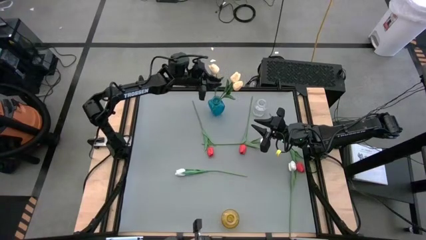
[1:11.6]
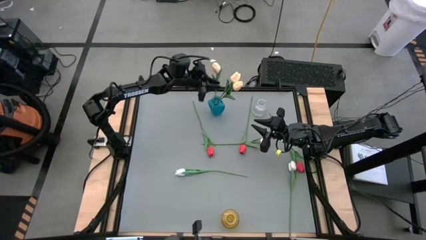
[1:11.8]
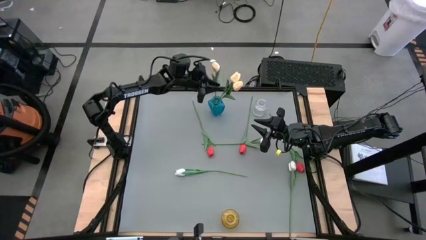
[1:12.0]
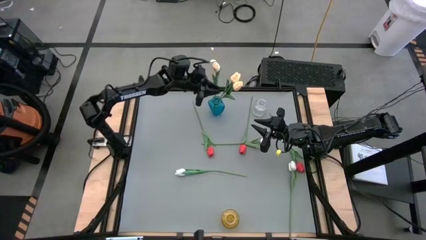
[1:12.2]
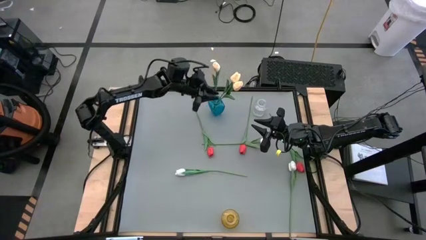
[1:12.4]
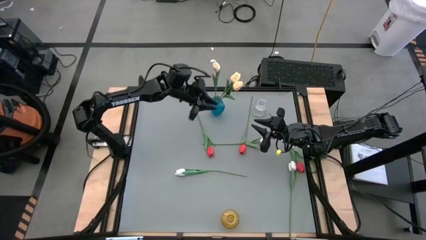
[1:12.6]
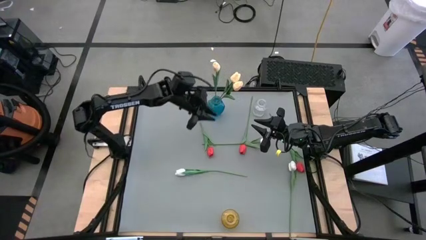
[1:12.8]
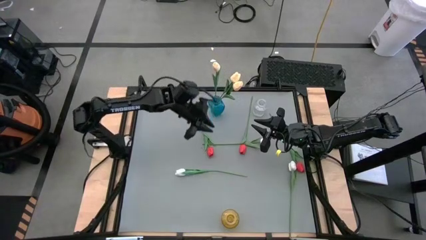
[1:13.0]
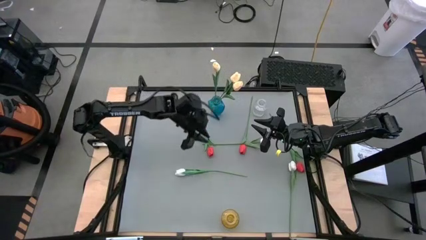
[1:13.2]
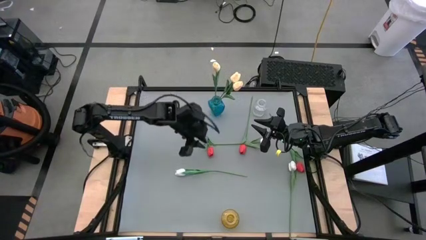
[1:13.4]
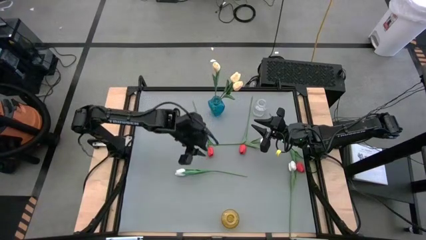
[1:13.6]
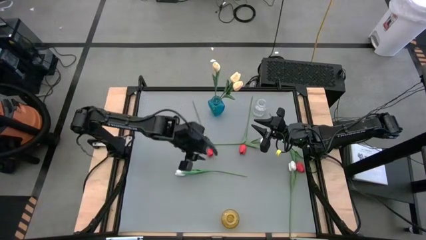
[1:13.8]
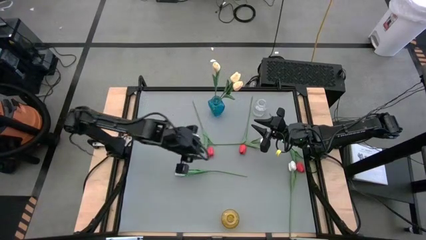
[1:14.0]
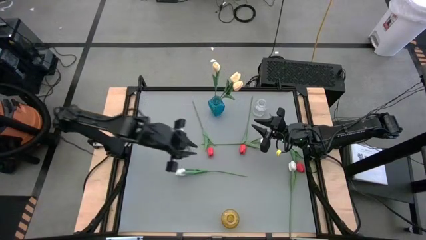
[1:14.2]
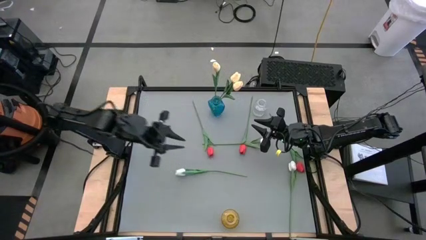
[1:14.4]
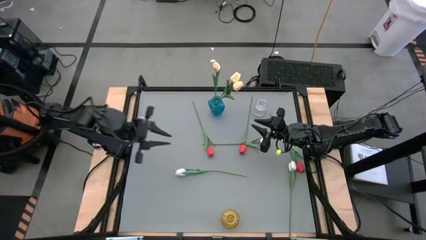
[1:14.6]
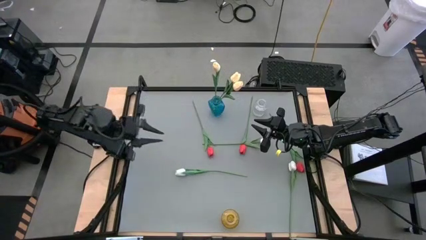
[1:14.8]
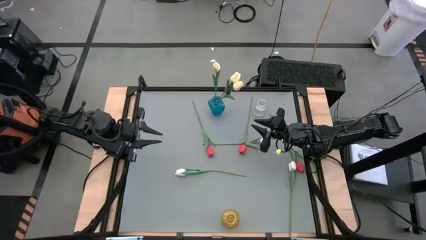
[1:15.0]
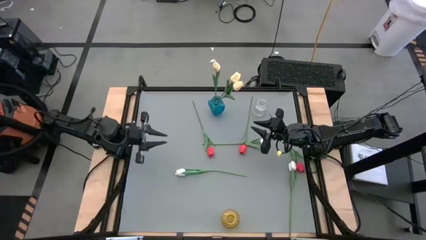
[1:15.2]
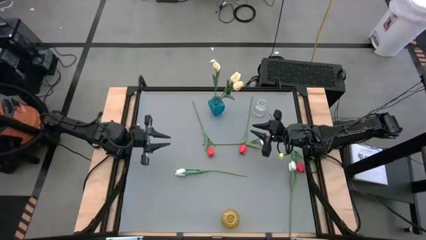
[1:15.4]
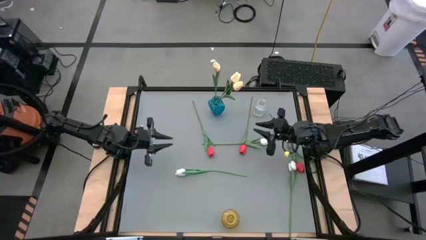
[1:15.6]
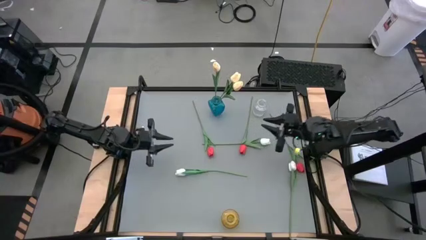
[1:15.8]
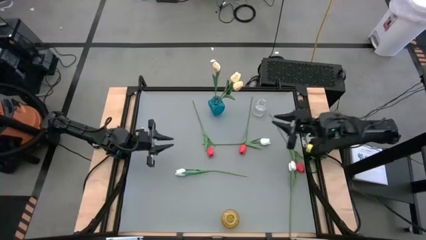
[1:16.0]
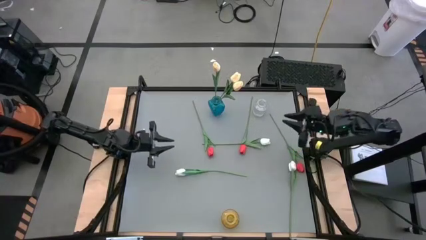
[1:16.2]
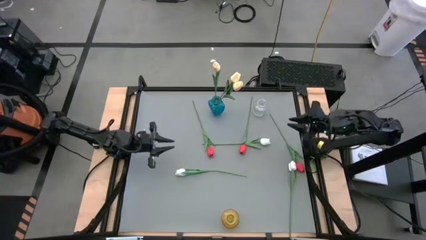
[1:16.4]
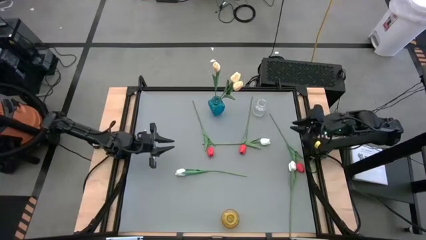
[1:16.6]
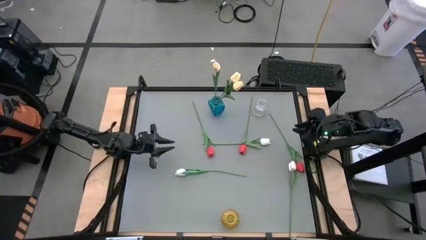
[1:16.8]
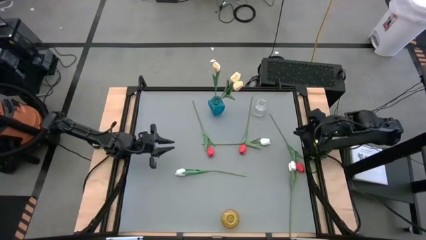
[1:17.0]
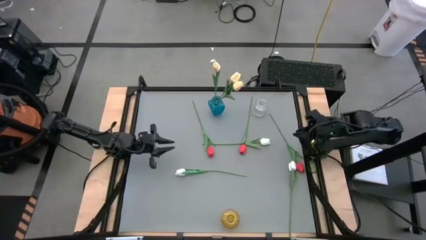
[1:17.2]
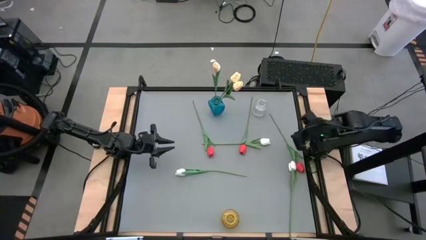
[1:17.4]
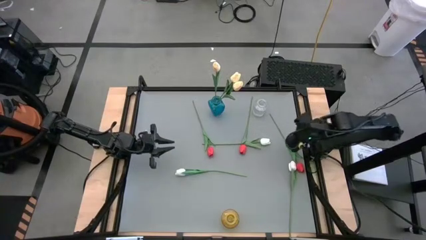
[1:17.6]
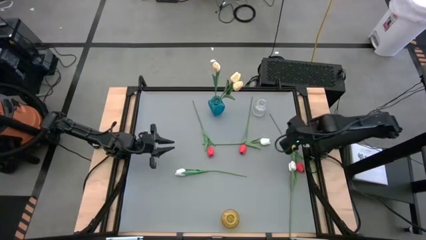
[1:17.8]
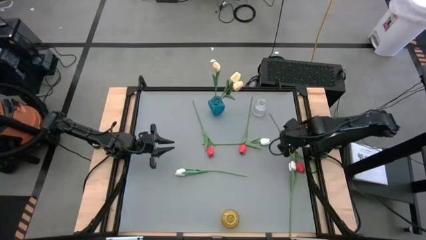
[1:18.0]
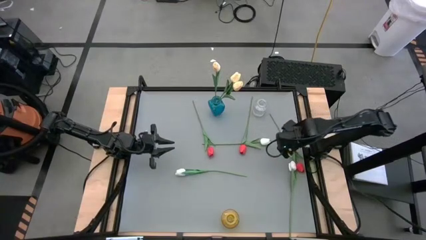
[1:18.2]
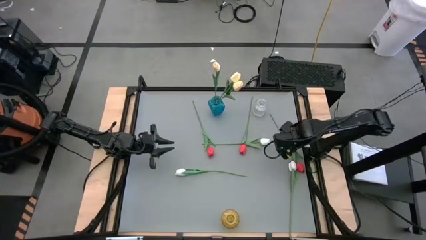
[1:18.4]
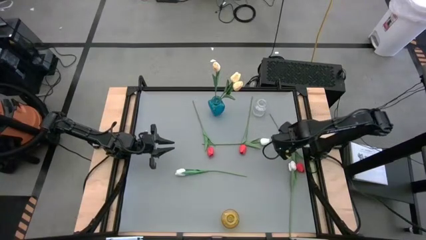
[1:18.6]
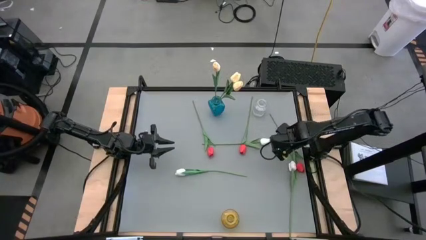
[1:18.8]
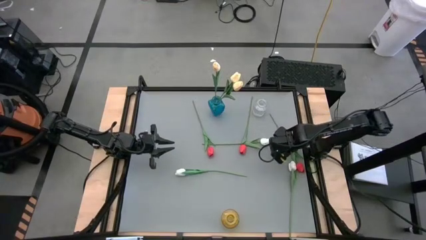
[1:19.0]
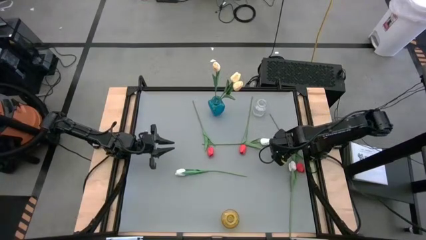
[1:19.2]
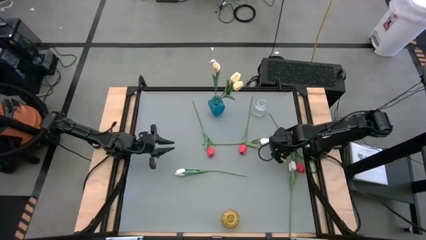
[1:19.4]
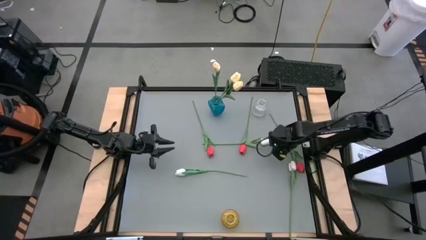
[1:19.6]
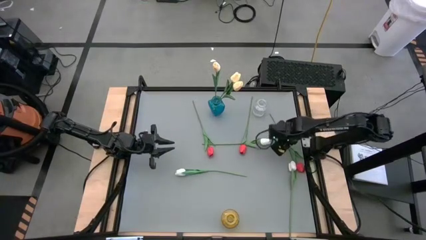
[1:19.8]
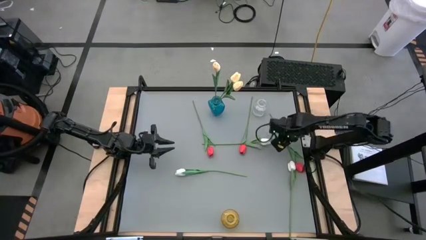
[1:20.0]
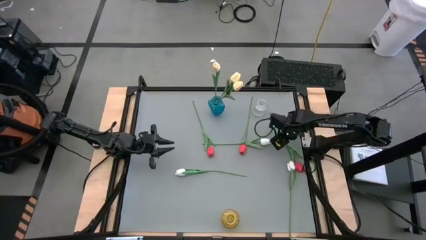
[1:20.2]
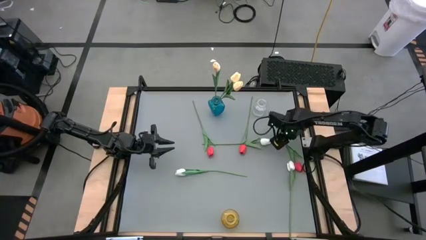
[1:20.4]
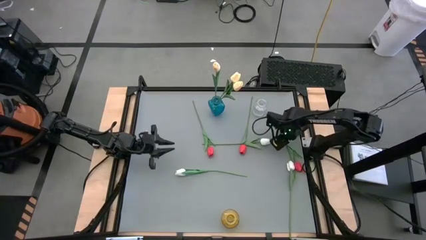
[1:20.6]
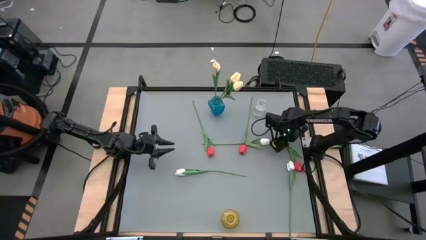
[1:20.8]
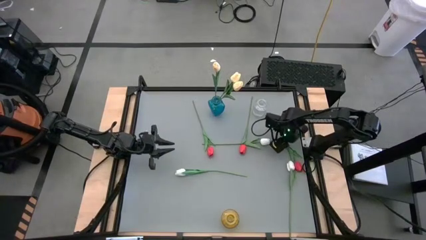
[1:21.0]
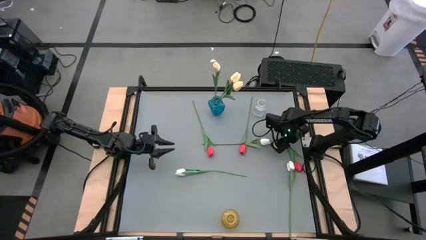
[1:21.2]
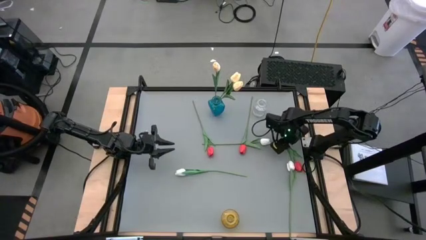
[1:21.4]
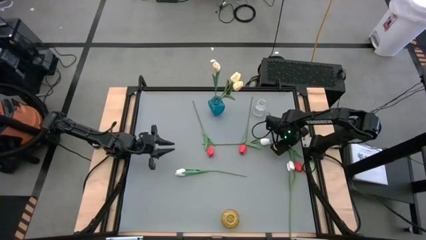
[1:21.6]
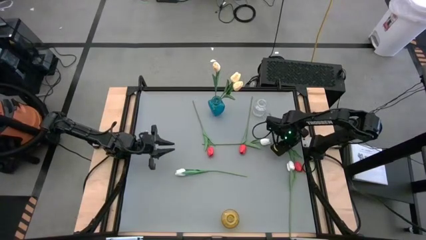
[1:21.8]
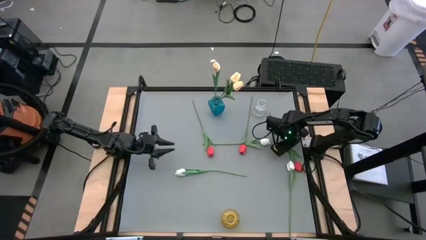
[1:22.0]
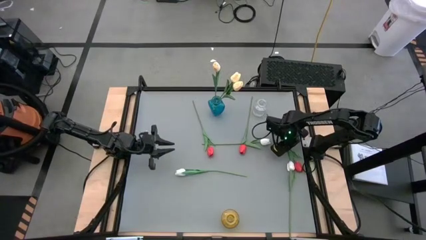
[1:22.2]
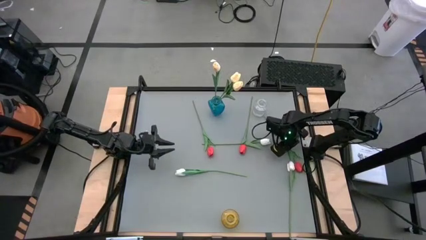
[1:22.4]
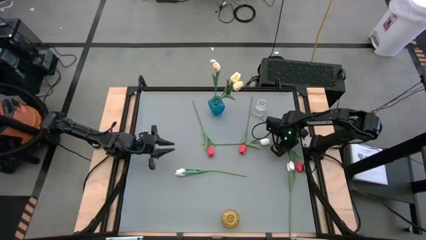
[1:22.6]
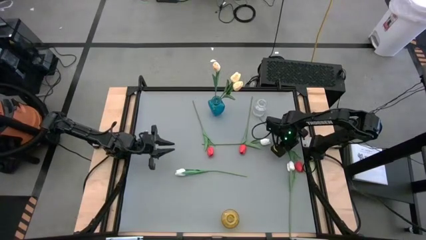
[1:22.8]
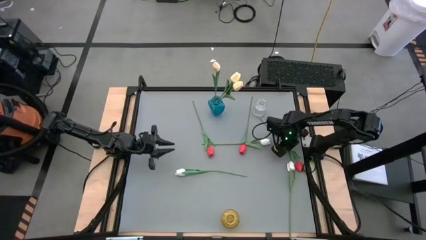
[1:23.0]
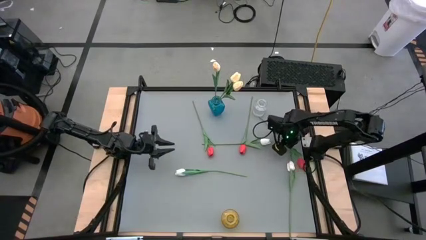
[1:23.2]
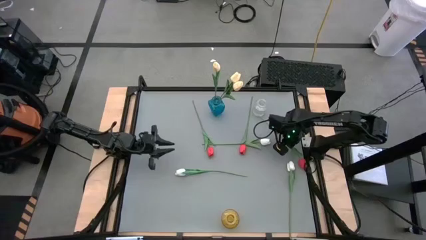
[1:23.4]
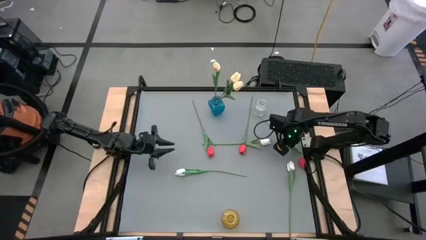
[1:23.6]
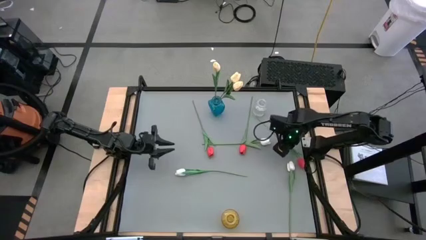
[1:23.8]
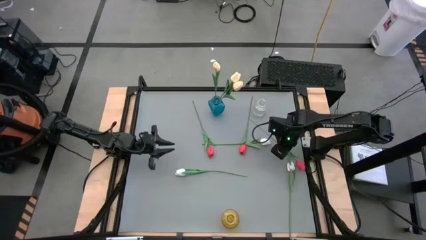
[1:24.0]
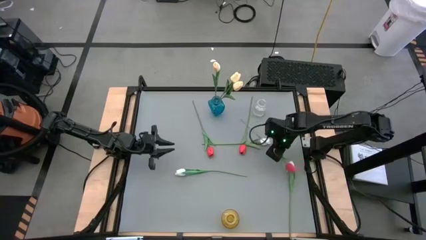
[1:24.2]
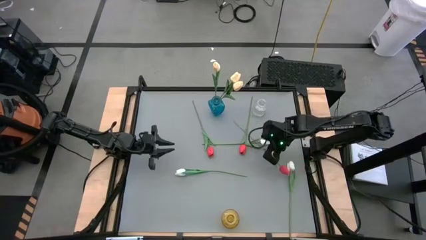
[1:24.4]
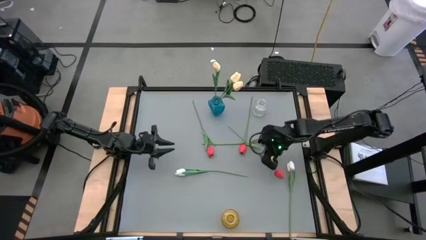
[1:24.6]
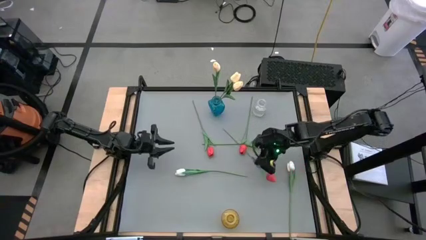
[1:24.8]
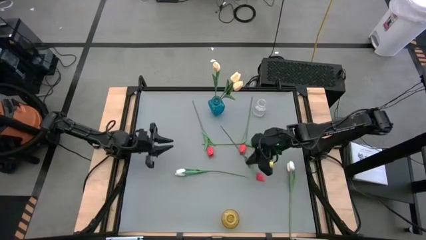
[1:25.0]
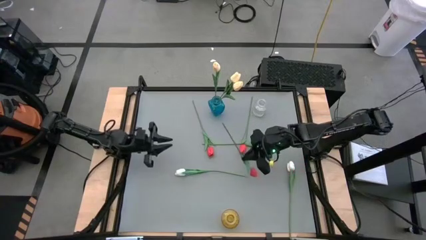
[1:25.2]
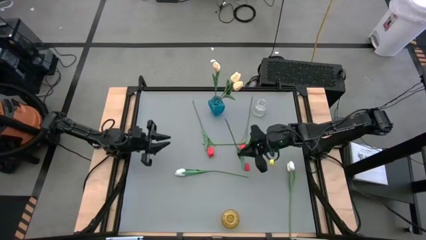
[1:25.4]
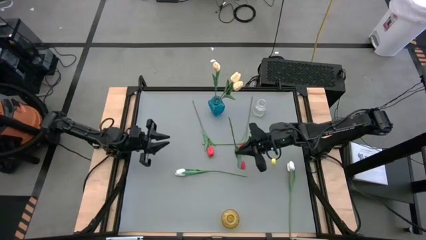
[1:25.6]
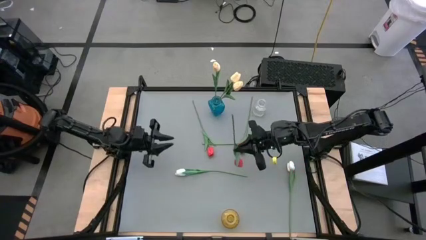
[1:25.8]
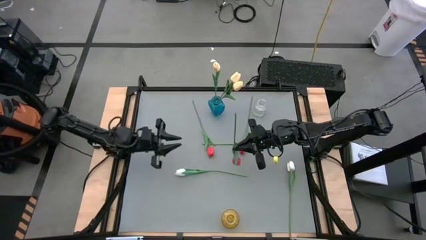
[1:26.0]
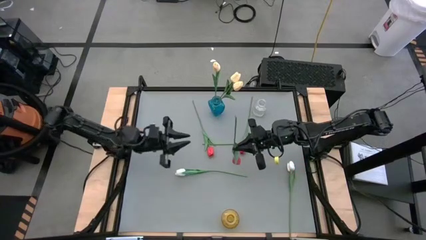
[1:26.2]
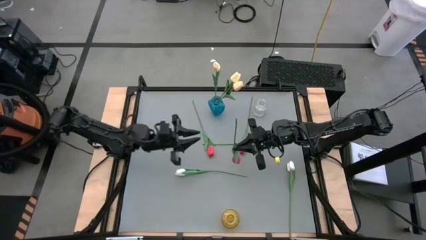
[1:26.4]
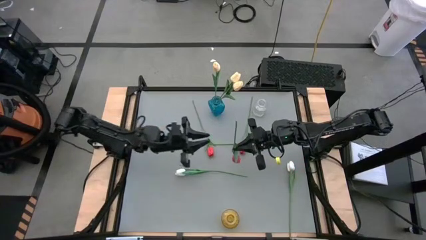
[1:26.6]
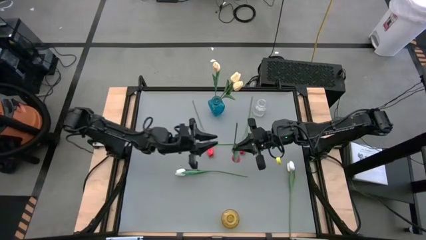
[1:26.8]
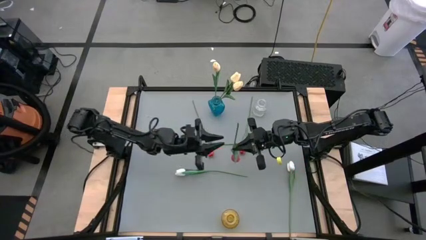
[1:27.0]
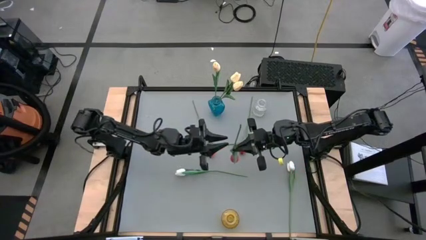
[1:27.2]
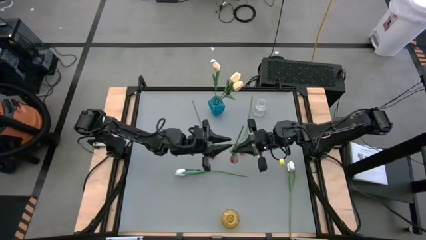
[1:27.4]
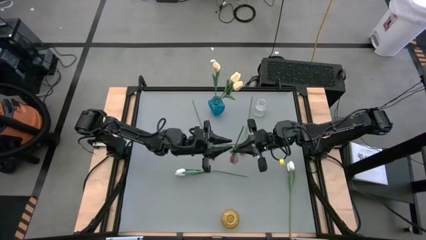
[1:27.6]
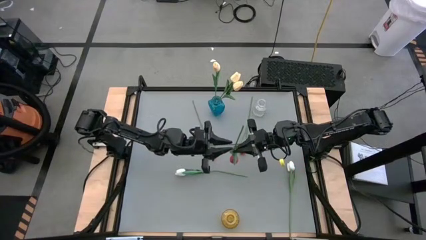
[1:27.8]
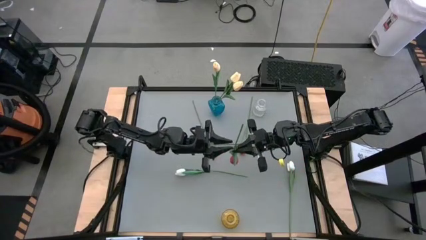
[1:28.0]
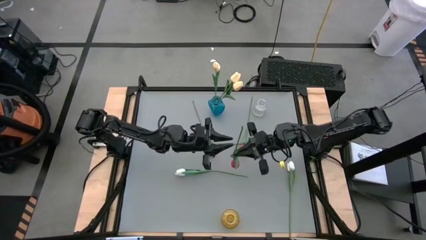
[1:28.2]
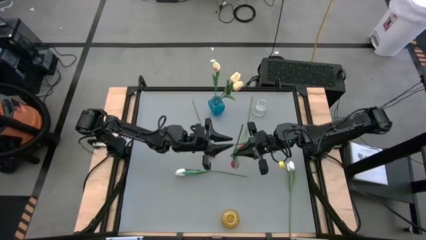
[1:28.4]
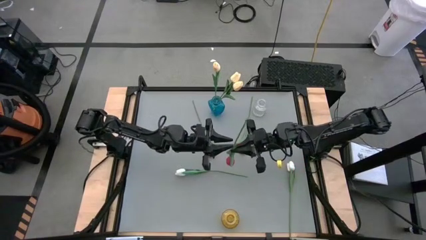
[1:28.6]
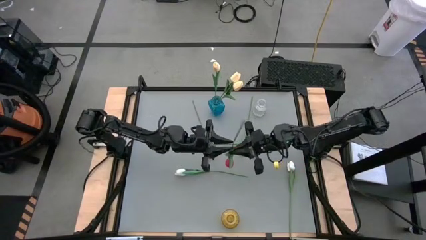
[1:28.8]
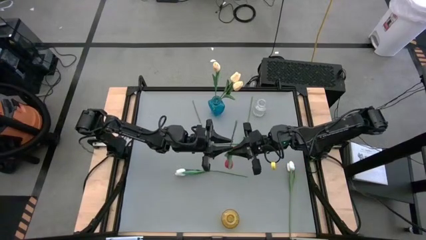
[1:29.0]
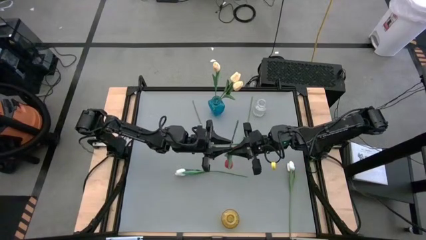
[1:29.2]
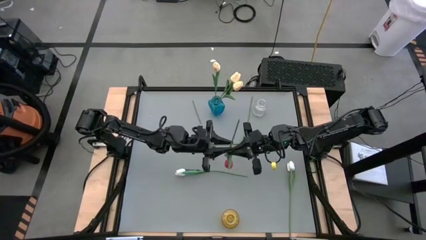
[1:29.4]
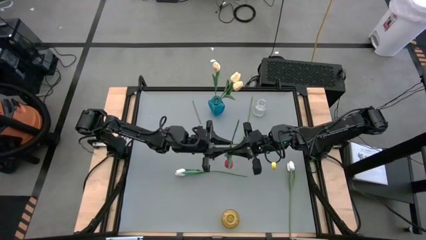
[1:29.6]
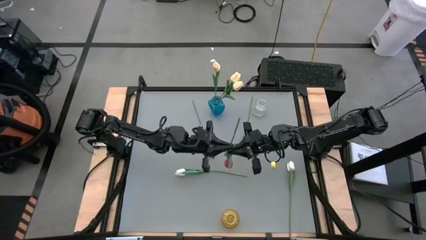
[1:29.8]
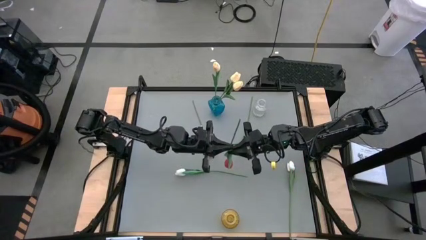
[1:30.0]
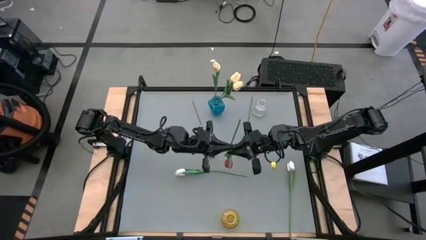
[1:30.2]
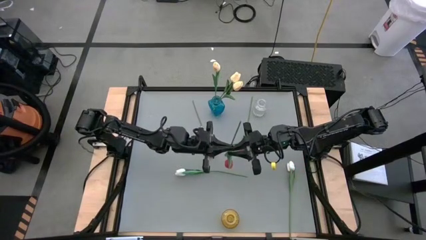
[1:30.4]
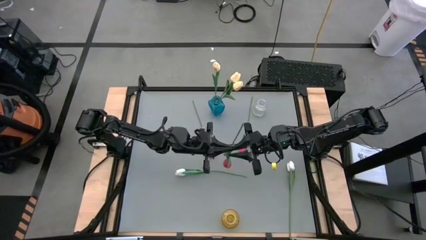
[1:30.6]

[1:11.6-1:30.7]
Task: Sort flowers into vase by color
Put the right red flower into the transparent vase
